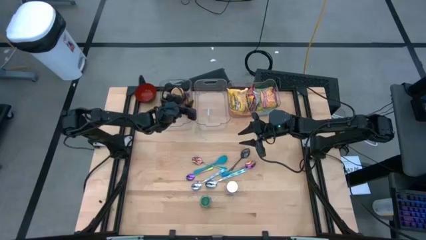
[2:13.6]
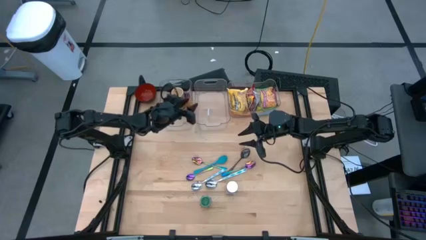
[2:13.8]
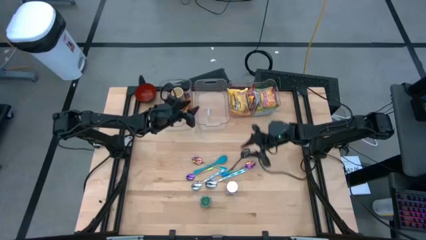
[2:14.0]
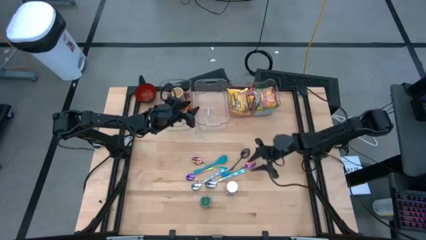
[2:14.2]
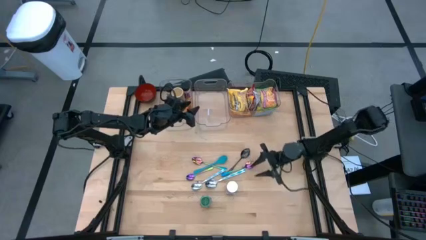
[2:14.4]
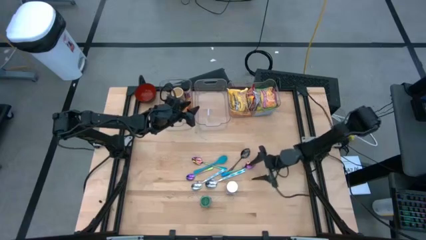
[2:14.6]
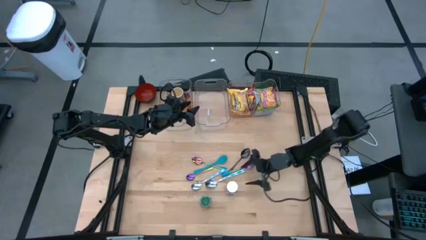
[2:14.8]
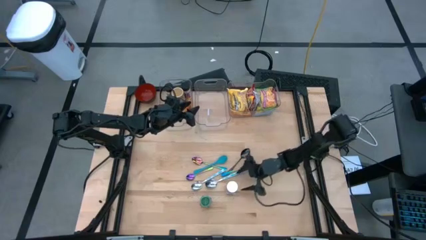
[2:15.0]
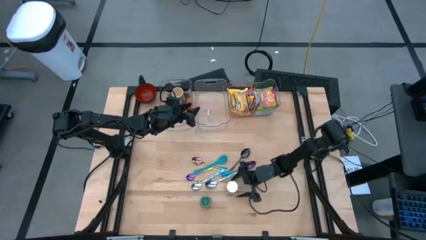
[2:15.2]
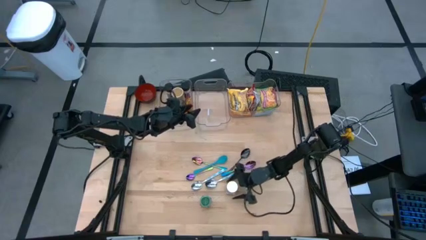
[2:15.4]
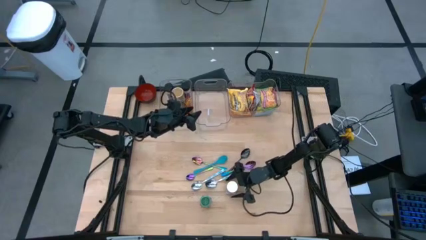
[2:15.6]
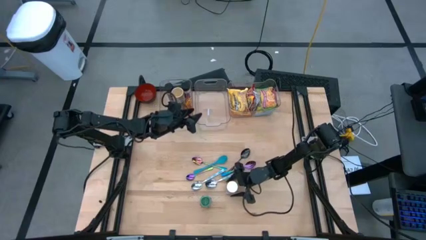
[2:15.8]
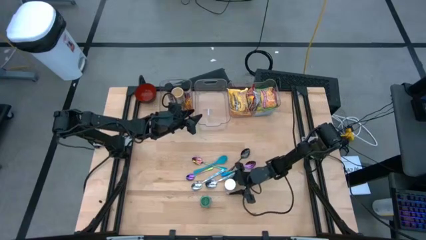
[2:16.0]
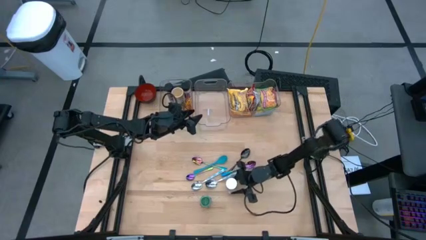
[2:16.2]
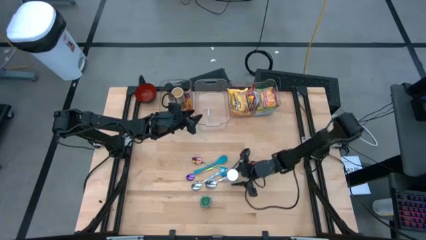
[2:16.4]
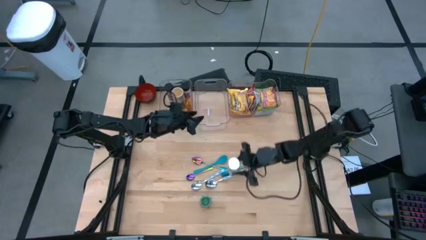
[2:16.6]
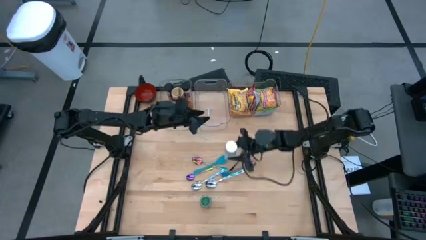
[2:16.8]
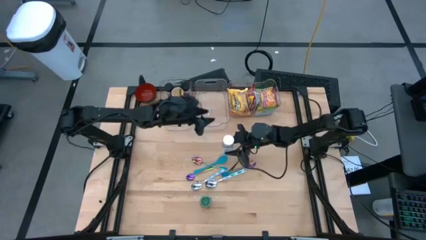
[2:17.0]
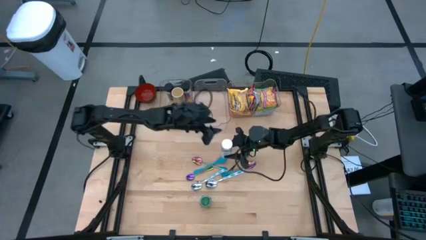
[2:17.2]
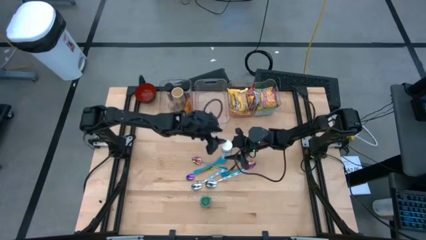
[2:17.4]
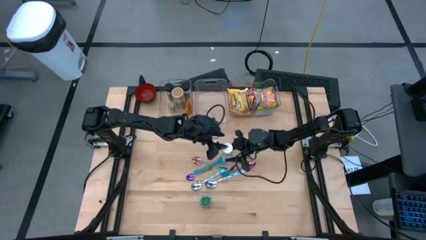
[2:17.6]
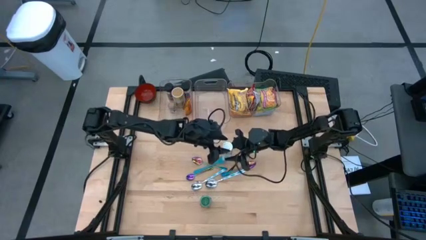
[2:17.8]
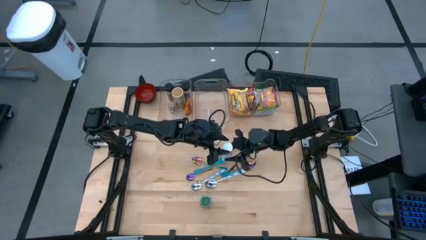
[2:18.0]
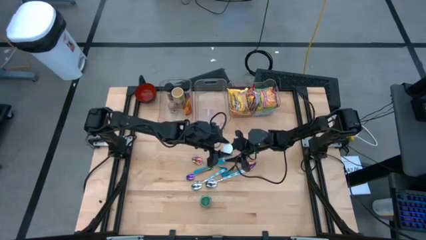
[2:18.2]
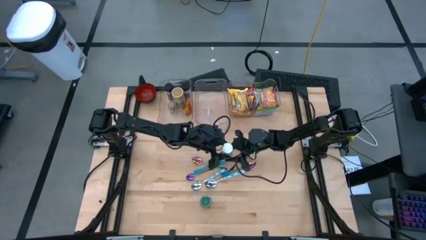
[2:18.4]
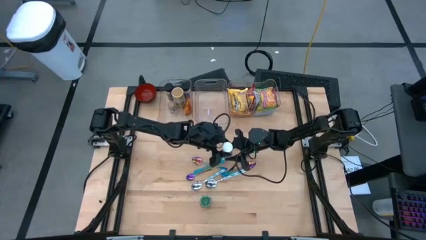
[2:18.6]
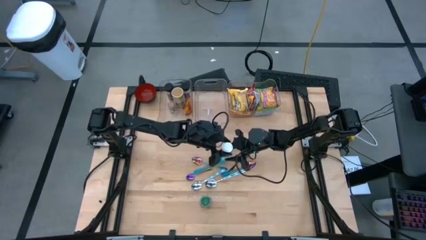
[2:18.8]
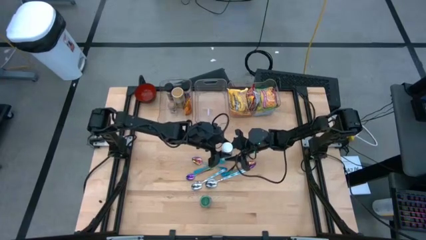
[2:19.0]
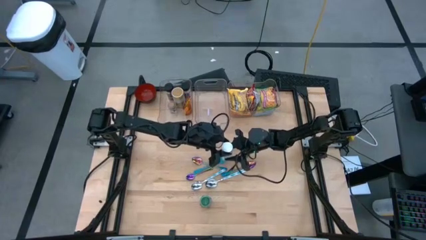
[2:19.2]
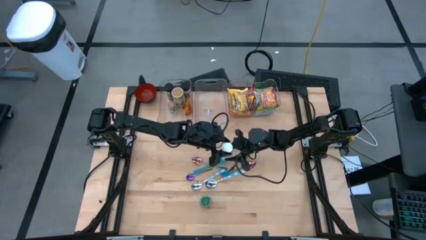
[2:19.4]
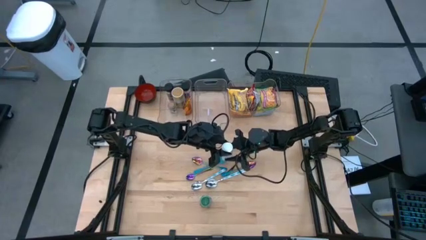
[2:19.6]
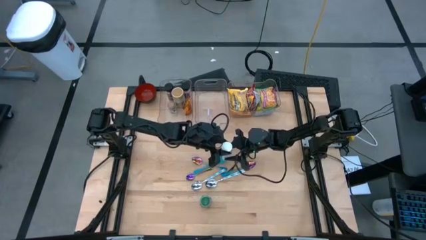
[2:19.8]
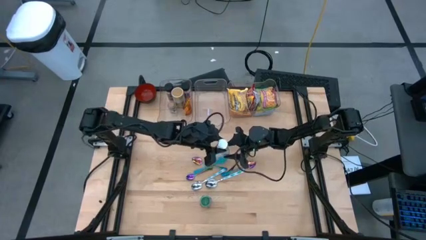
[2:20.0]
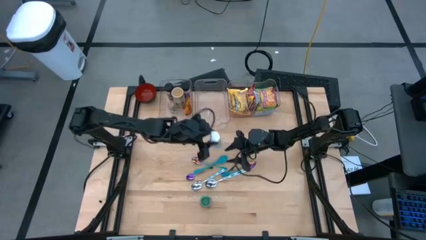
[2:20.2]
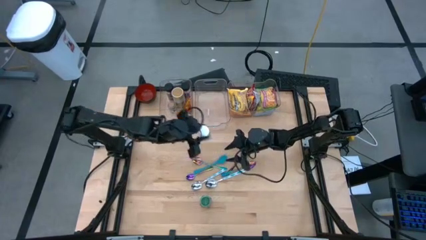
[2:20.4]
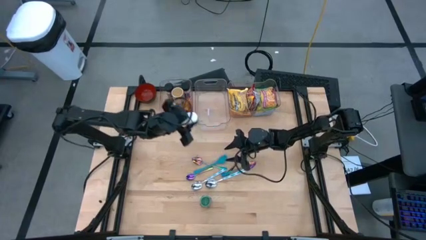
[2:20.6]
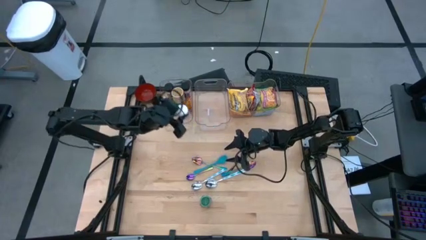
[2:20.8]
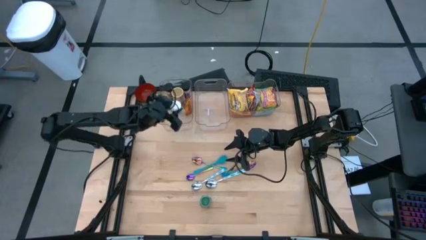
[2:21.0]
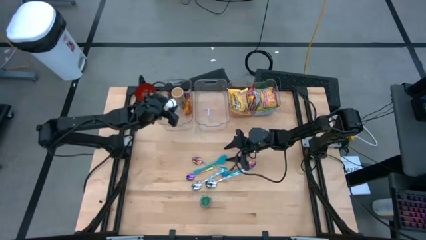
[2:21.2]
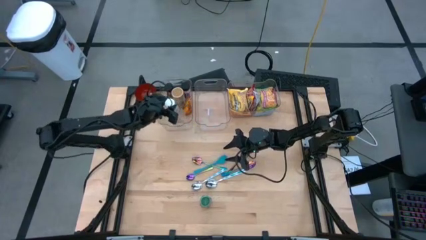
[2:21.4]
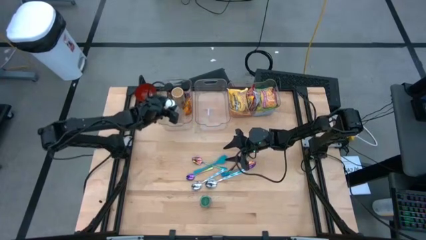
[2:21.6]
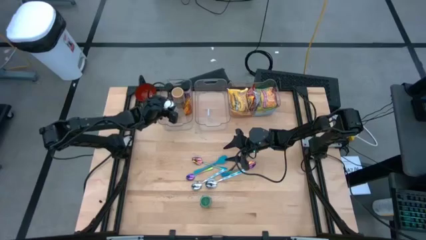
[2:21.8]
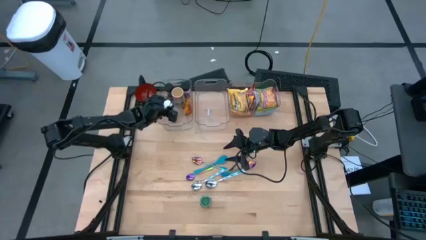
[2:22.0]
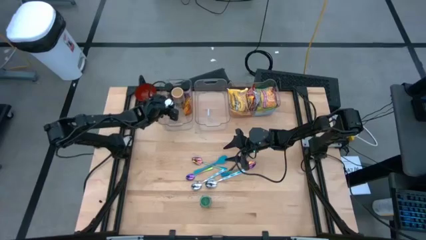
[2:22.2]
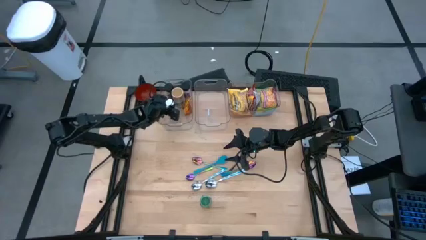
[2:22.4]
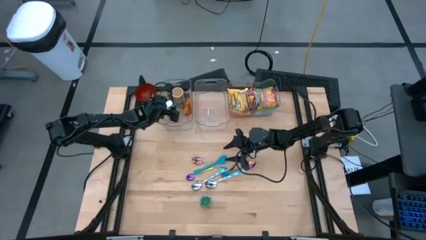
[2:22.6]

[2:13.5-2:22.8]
Task: Pick & Place Food Item
Put the white seasoning bottle into the left transparent bin

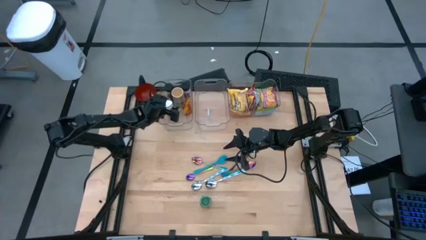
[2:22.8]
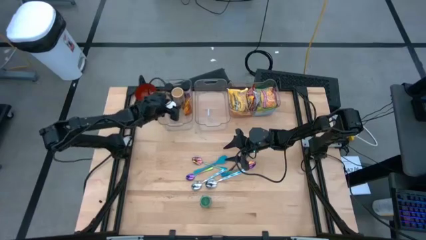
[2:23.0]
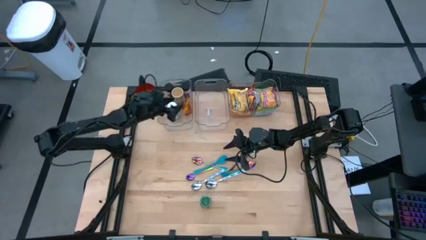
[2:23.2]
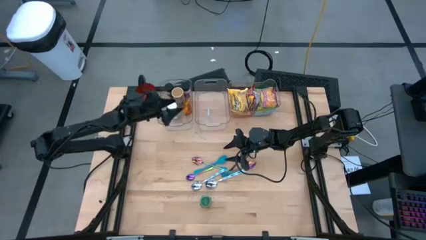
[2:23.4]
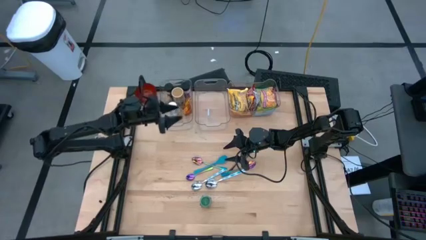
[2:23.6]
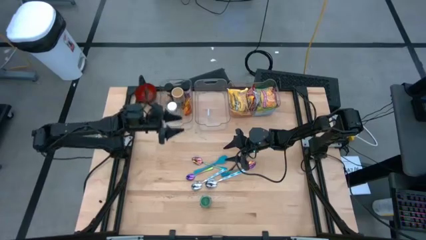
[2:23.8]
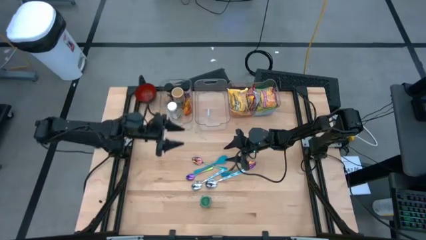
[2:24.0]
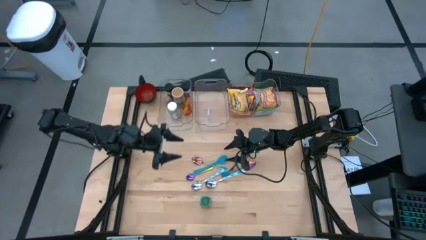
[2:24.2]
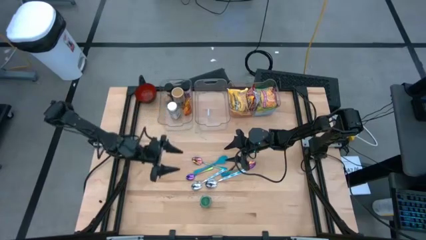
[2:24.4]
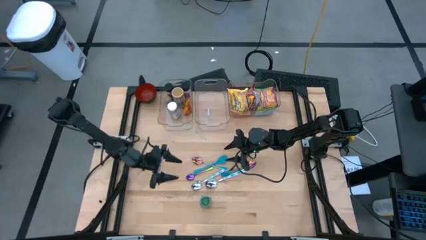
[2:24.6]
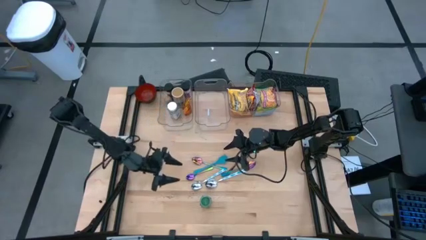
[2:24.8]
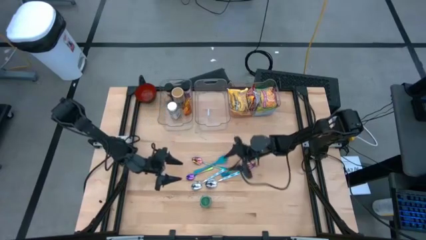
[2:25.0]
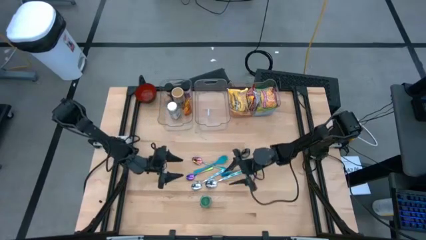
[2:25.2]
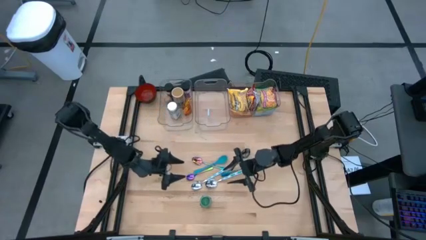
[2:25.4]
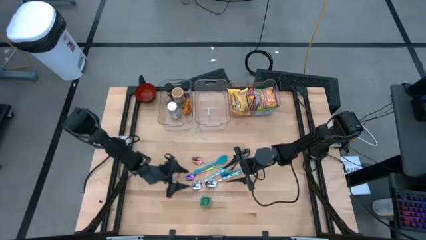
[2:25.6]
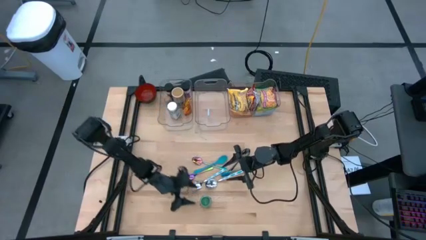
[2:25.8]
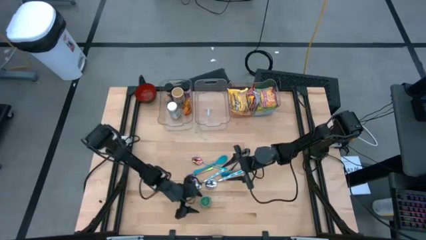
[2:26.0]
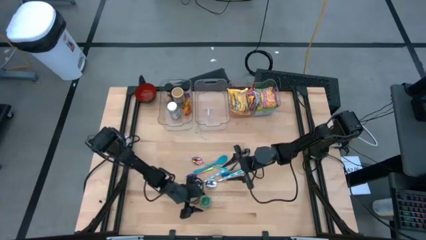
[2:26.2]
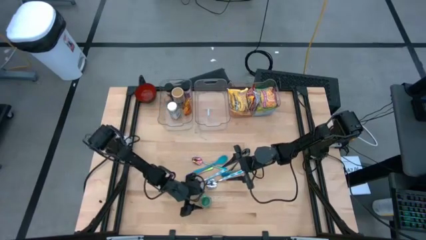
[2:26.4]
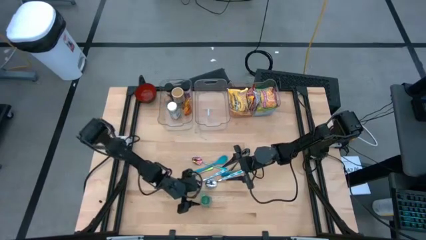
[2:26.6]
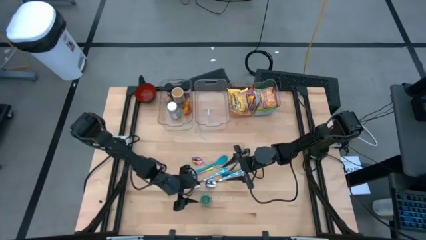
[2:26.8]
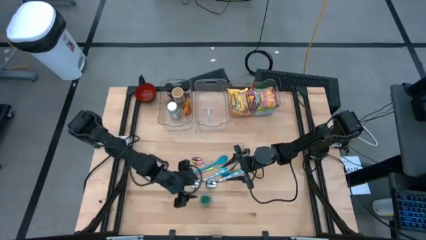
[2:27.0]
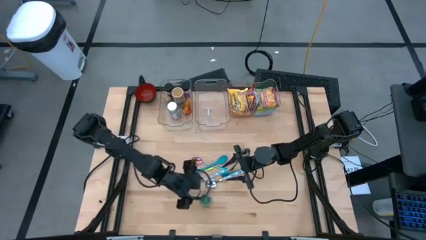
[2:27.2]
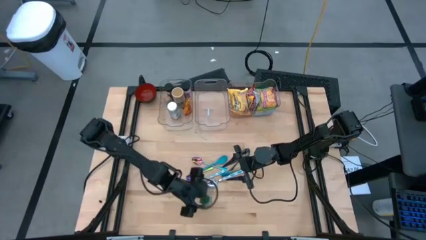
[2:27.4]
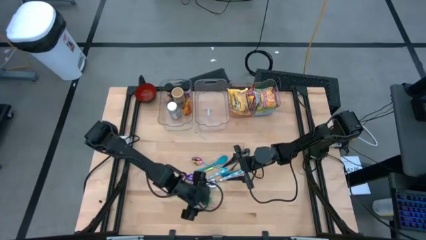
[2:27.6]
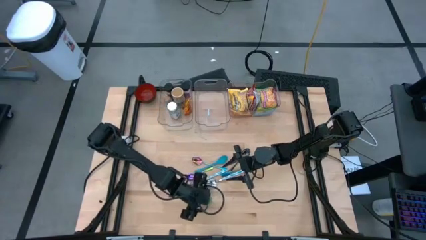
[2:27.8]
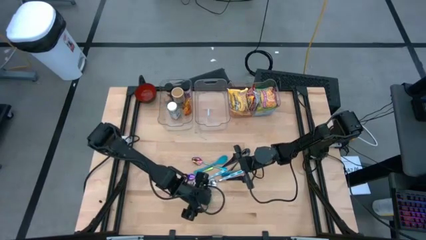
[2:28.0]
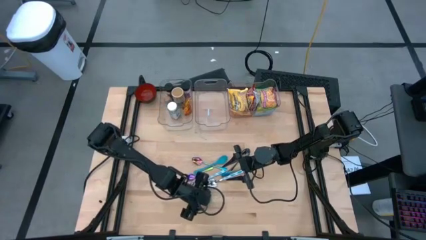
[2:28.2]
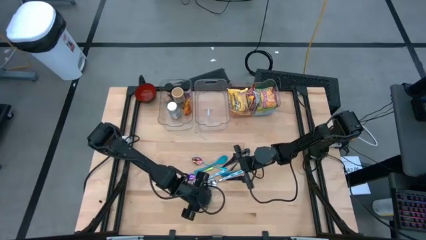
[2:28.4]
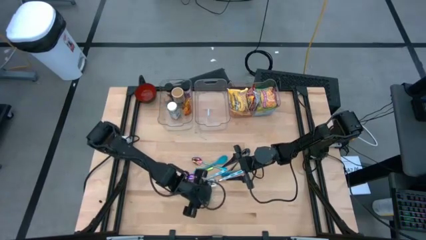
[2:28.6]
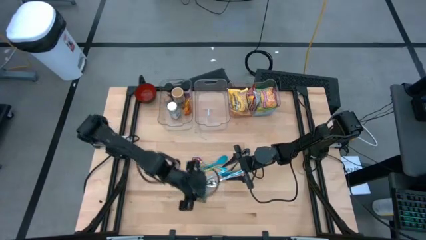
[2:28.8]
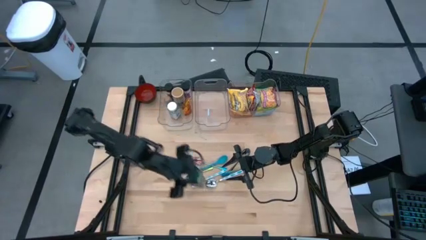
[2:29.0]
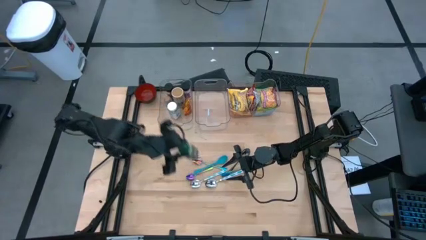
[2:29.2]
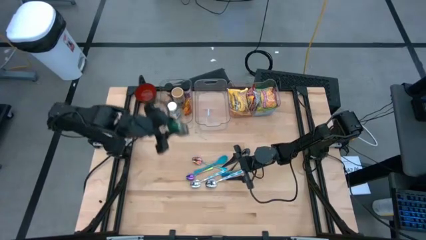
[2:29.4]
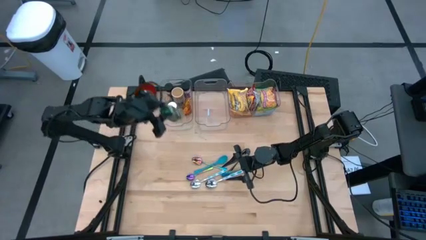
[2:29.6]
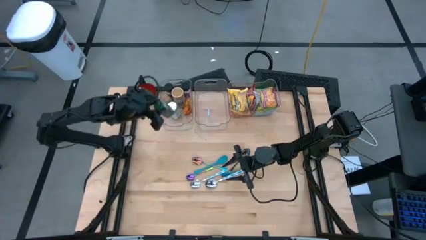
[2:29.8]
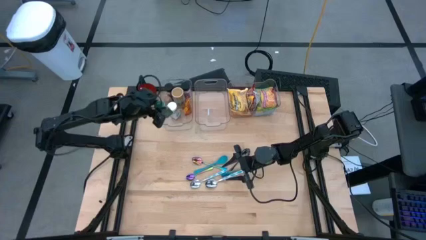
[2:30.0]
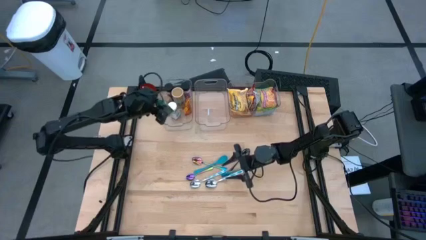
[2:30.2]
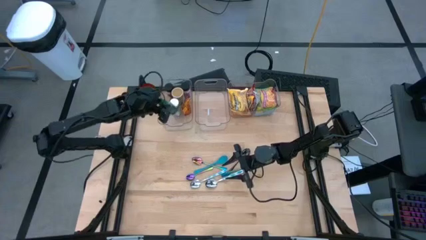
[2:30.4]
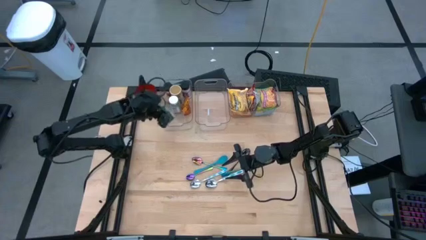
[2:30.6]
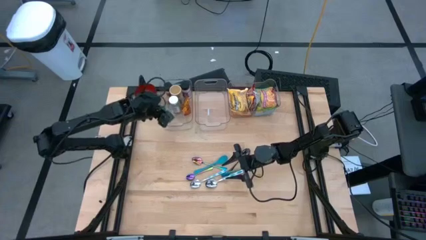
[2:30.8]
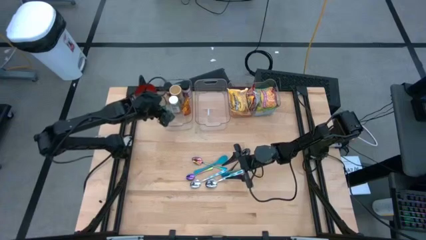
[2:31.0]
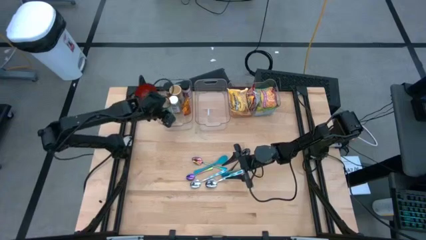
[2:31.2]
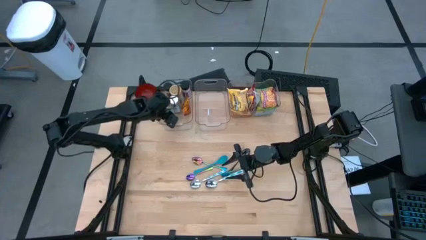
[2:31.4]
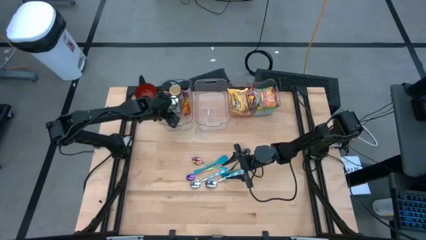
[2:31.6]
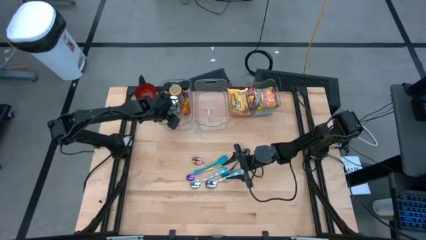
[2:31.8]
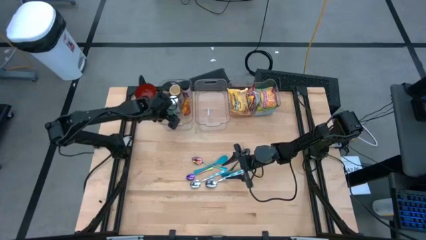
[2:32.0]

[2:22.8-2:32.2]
Put the green seasoning bottle into the left transparent bin
